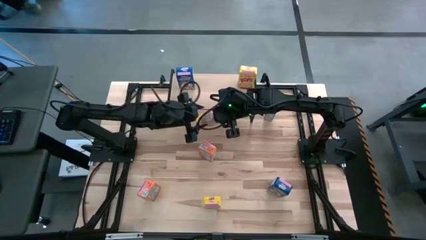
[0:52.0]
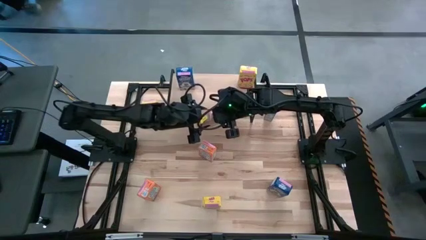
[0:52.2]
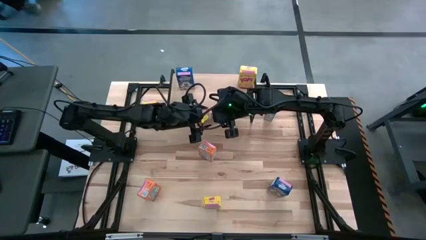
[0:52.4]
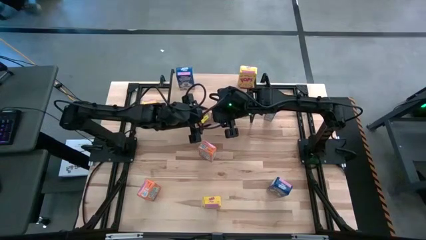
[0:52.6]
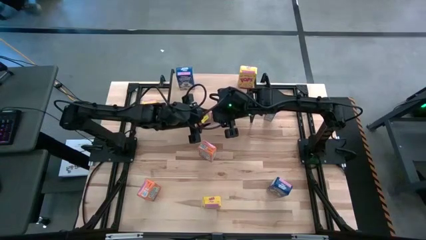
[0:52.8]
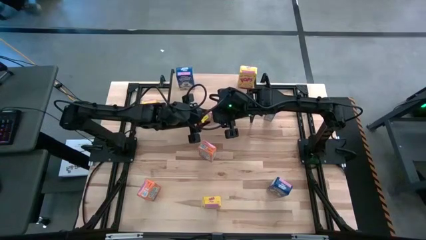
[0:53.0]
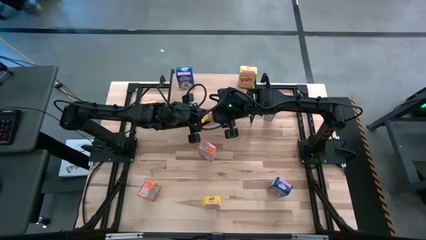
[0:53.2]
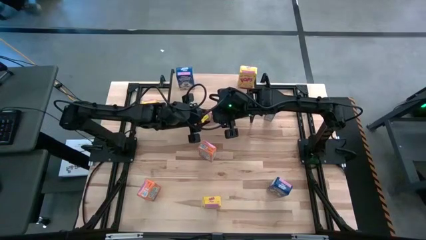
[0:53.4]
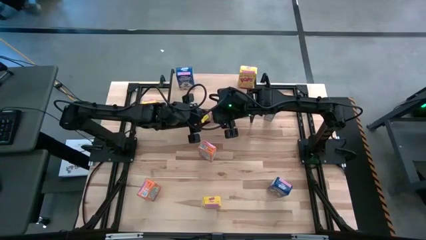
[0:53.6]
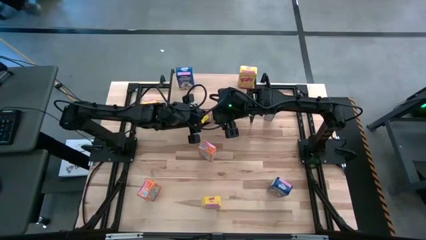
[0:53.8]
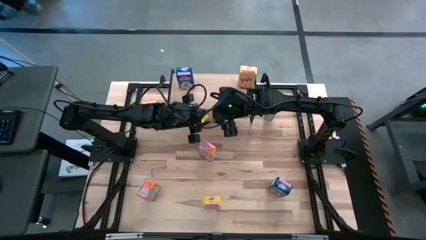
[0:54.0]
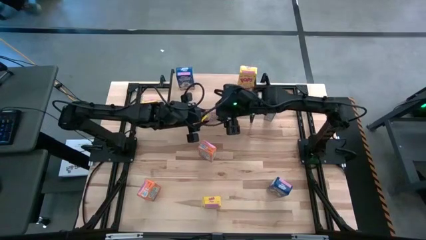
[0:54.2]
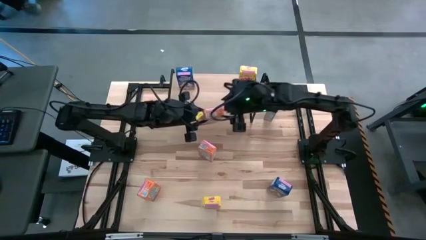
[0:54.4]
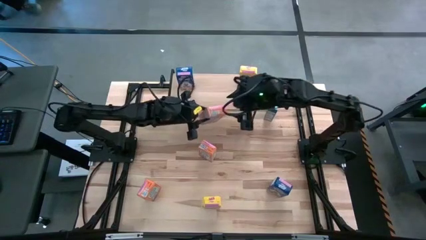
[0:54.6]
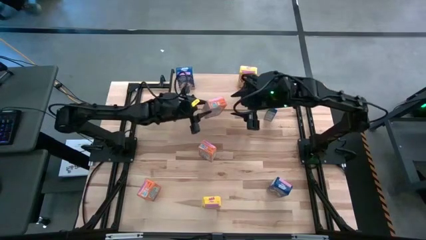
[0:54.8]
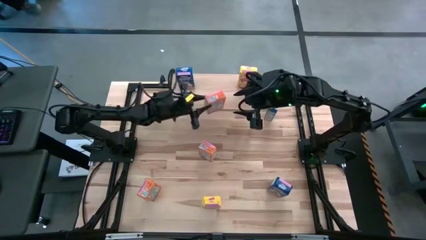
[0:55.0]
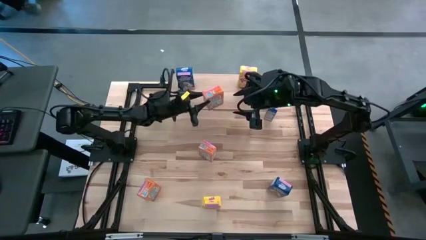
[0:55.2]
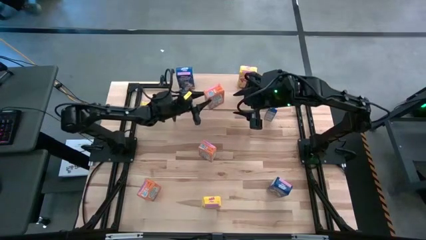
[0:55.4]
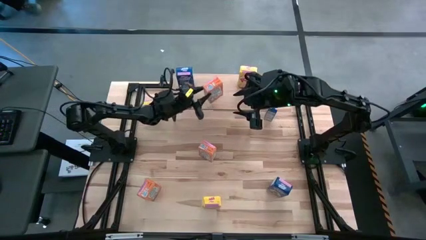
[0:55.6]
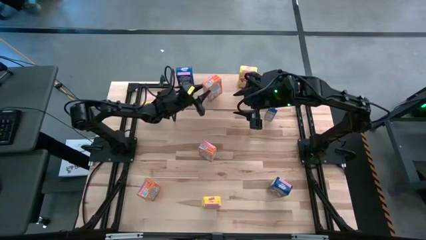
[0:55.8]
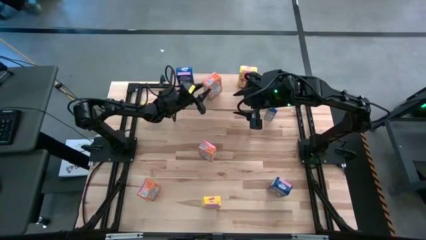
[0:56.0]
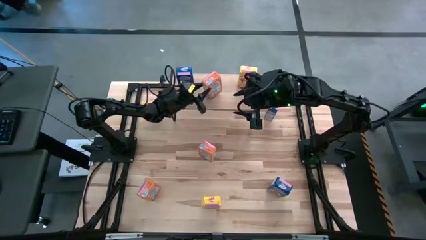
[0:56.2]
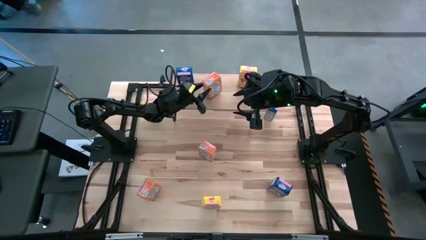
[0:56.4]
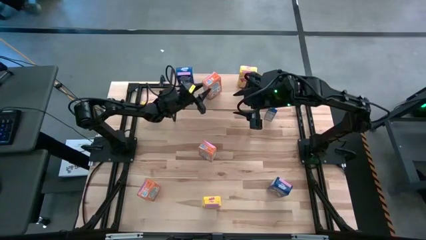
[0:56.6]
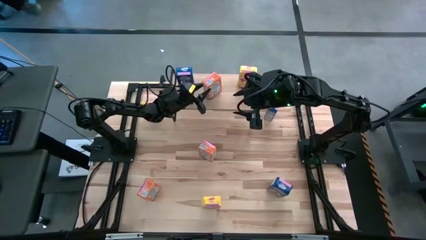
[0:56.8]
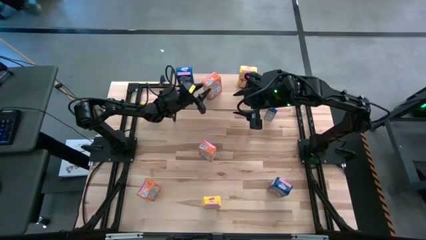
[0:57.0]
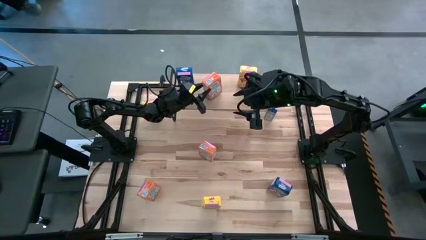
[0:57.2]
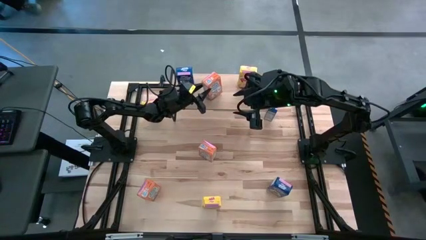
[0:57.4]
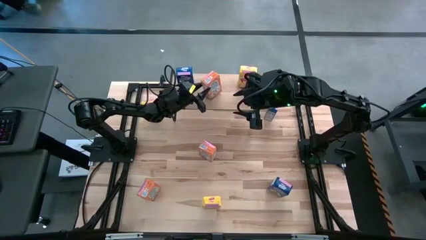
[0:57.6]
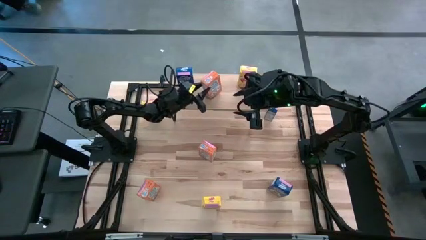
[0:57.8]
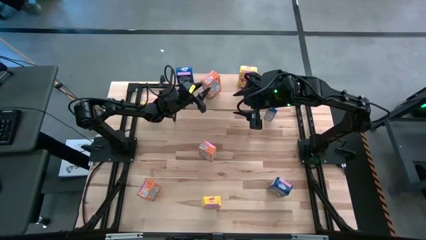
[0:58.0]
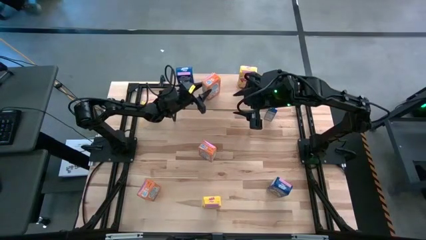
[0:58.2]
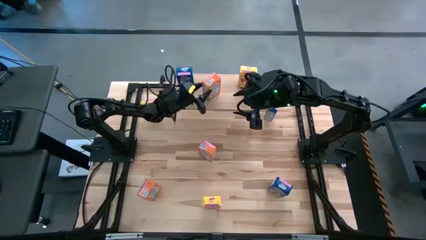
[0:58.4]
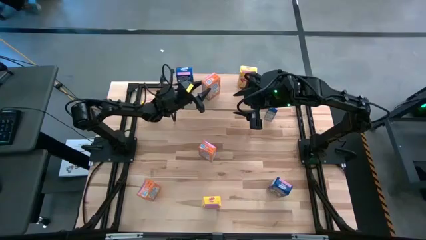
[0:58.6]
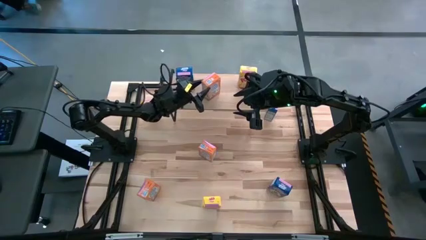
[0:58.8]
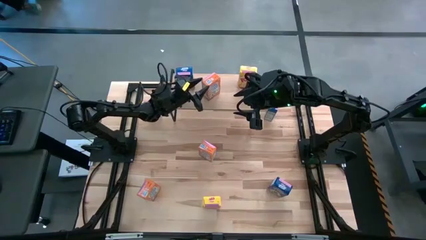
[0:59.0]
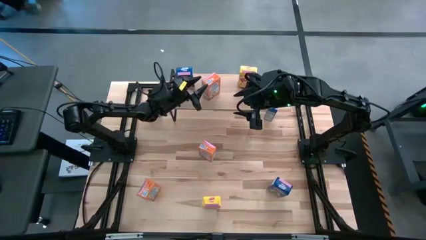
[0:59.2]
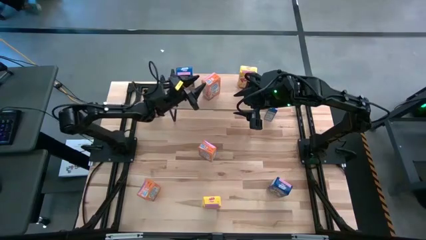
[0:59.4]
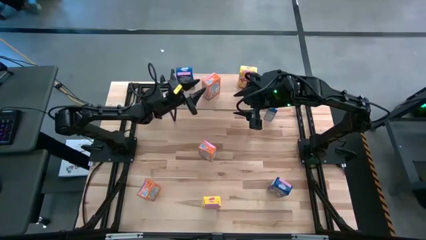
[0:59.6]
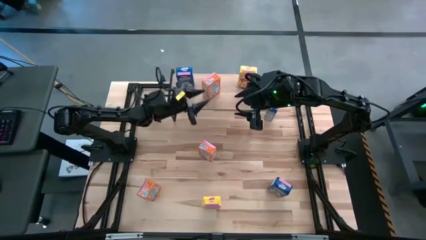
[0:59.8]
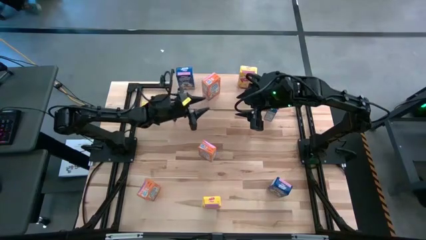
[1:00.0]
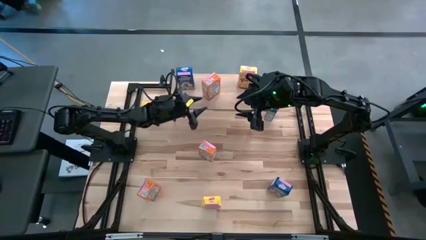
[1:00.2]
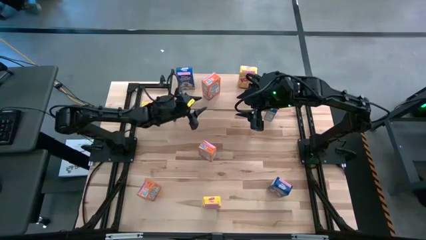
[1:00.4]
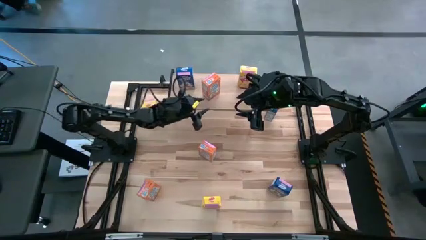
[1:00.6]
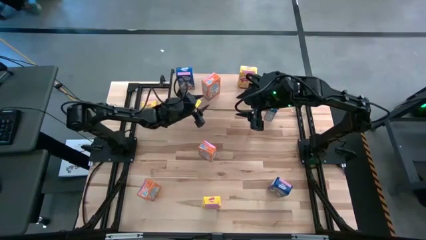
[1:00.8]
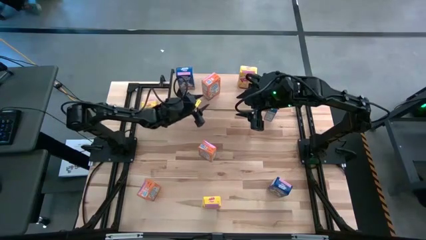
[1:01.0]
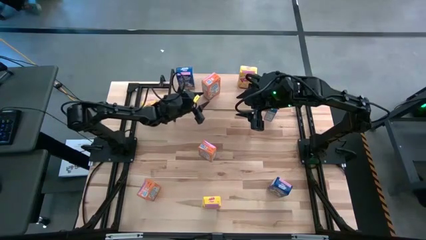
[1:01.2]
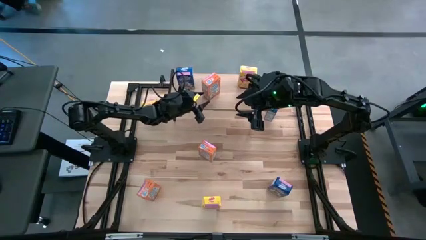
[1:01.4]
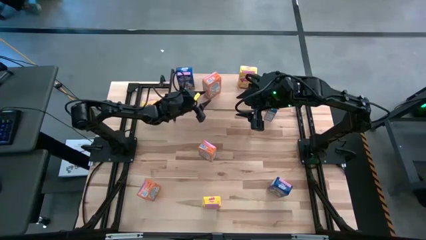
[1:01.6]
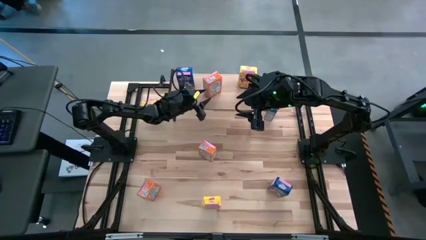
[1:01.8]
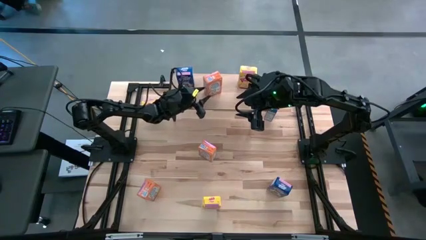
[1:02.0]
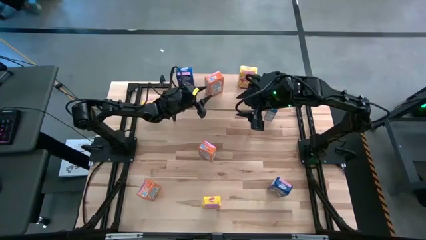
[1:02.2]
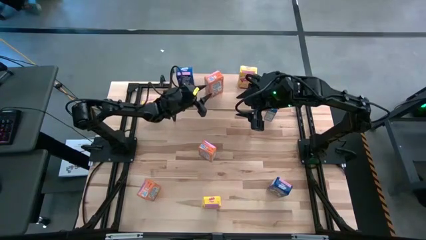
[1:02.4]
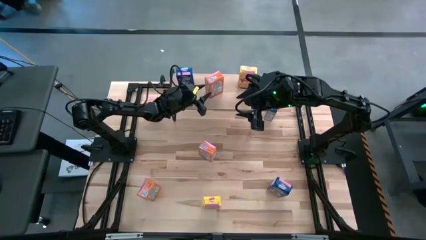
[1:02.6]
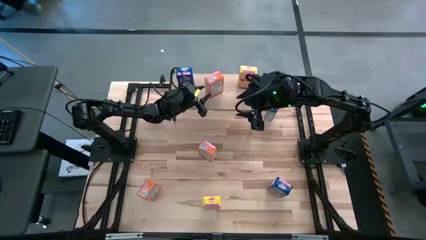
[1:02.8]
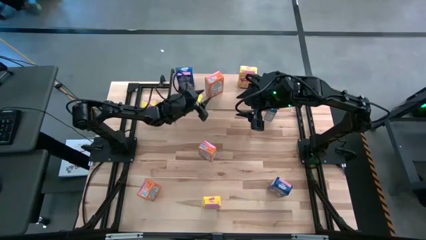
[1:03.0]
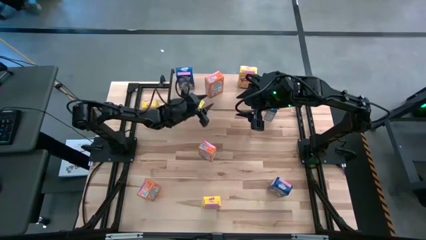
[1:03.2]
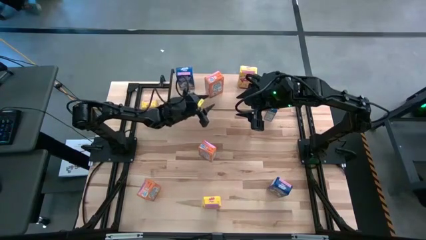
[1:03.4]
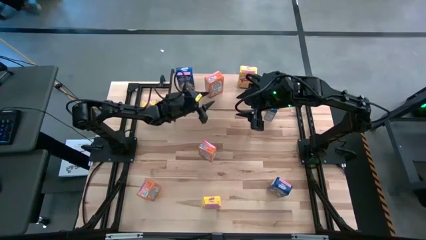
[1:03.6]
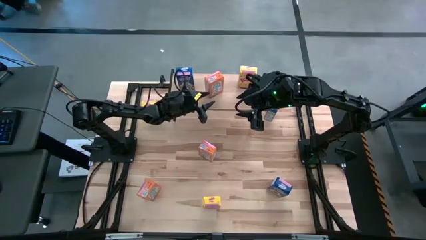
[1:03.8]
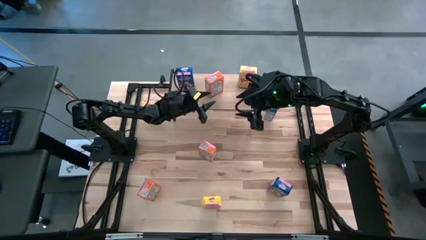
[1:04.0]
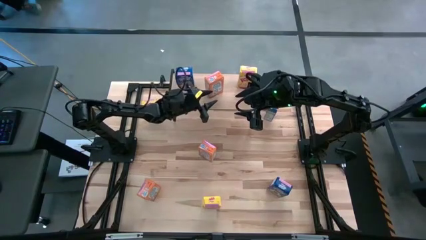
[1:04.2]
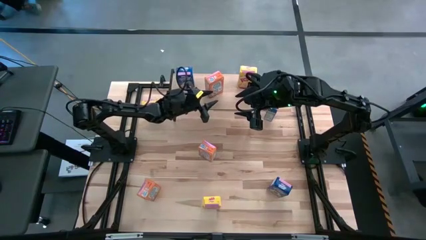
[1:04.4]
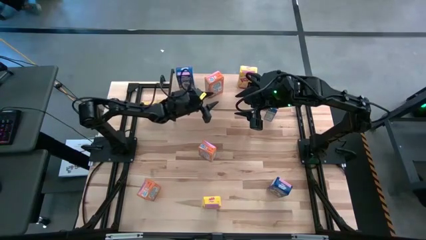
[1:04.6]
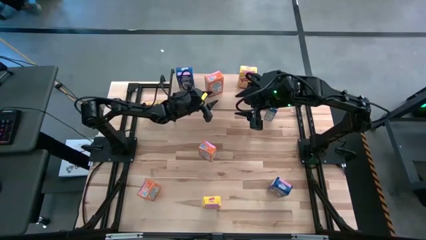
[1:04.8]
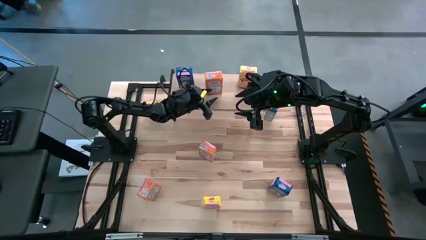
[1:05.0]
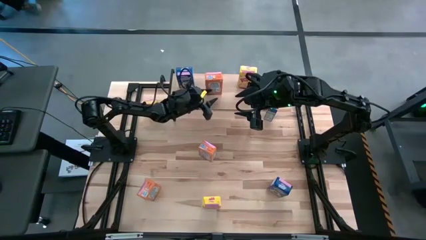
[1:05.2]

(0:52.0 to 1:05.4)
Task: Stack cereal on shelf
Put the top right orange cereal box on the shelf

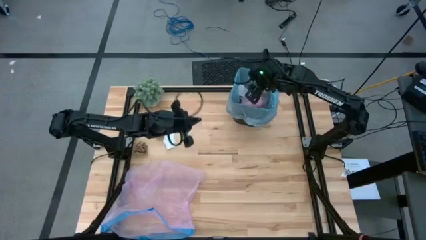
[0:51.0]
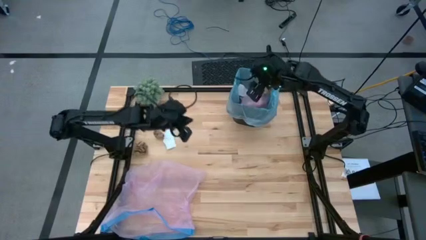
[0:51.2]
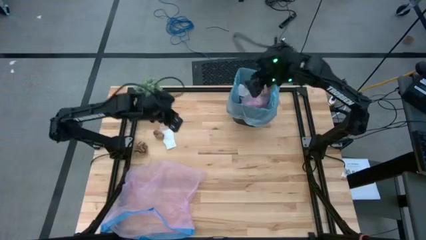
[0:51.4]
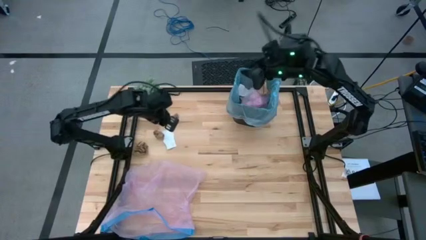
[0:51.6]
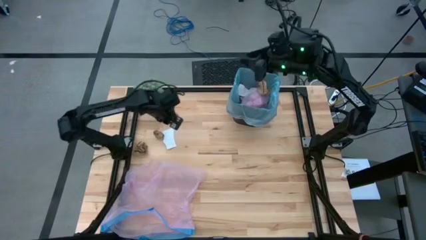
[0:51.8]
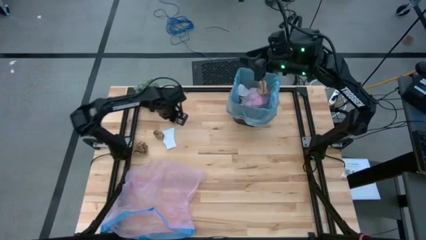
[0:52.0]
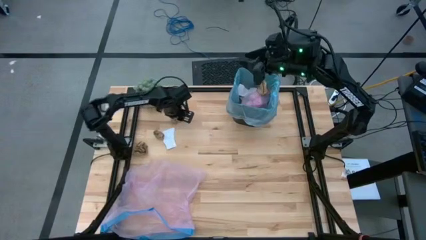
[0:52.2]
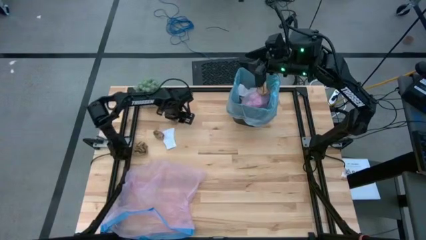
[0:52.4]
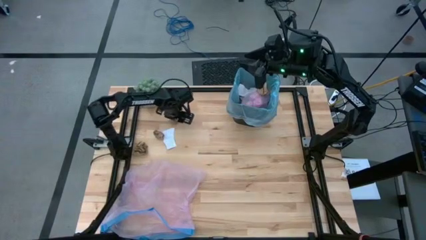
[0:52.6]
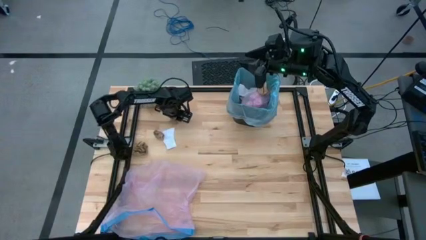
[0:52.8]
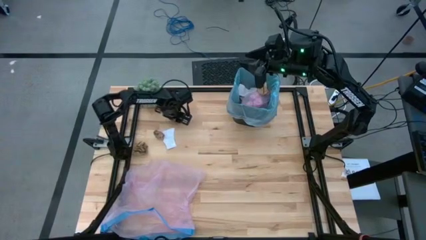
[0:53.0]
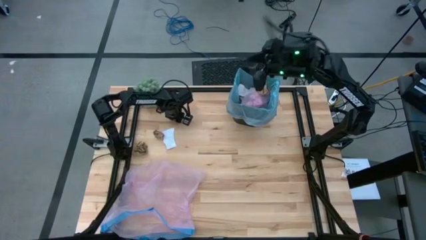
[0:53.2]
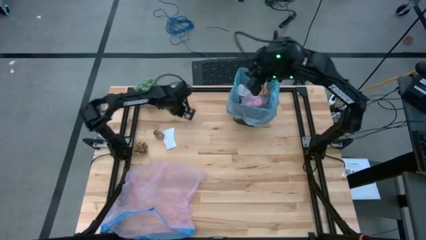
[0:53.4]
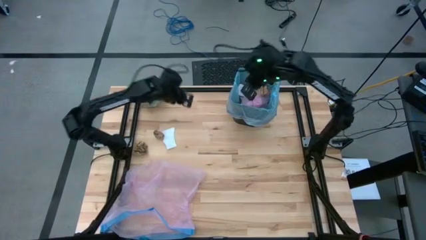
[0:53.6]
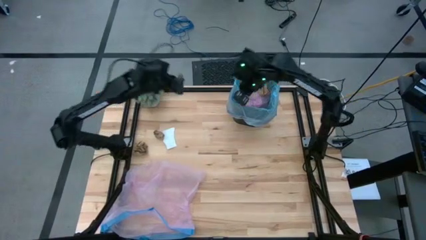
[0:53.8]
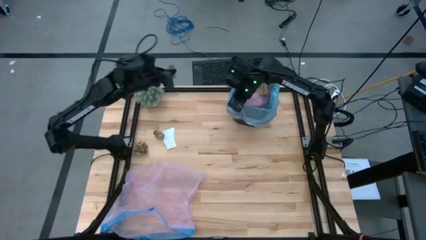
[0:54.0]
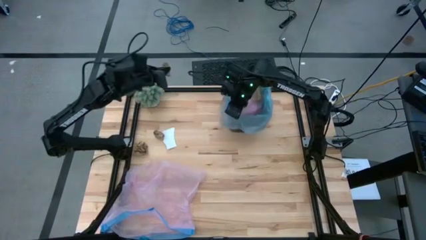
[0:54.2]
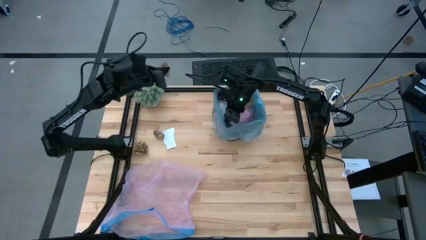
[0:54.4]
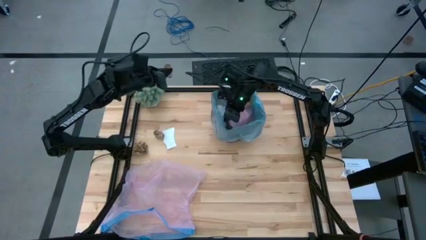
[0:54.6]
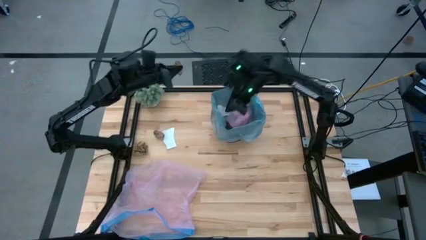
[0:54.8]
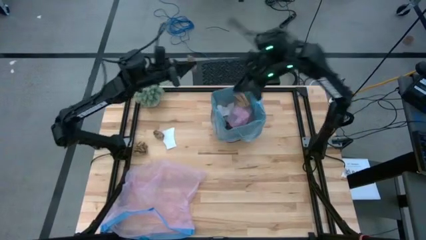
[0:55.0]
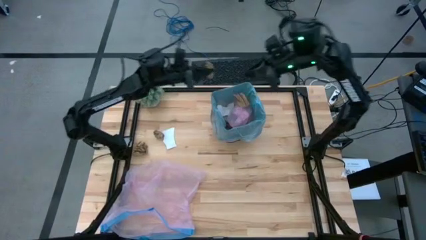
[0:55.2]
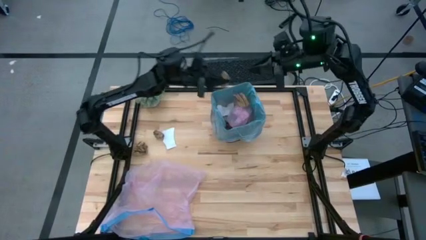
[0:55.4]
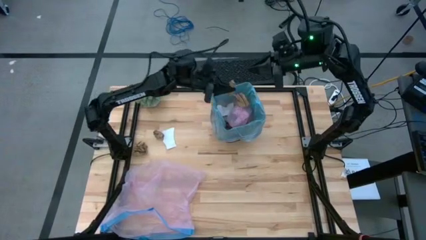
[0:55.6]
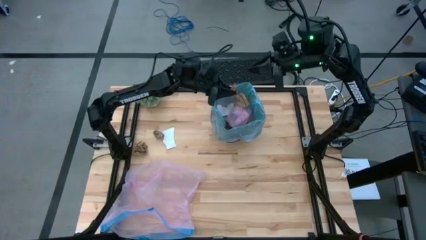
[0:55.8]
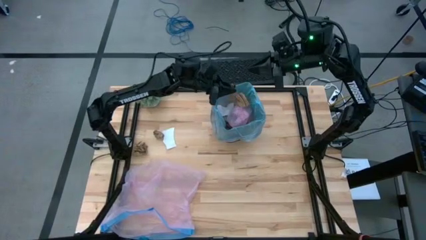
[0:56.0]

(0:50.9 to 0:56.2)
Task: place trash/remove bag and relplace
Put the brown napkin into the trash bin
